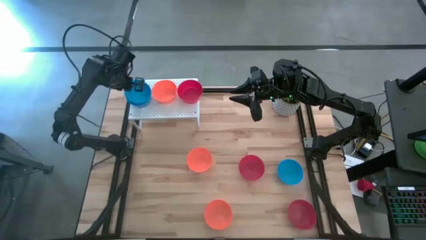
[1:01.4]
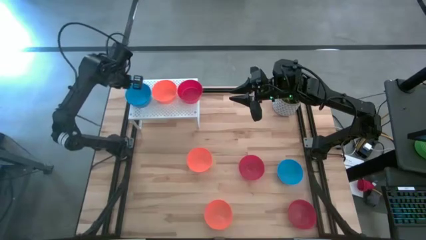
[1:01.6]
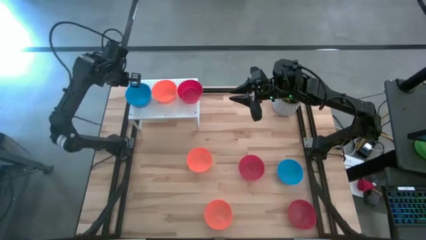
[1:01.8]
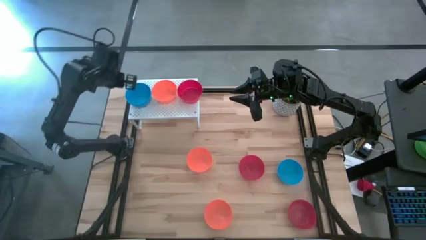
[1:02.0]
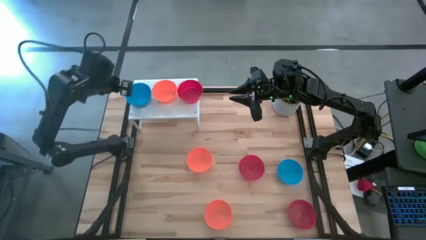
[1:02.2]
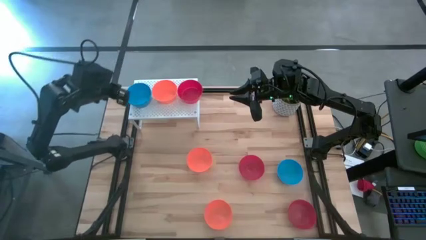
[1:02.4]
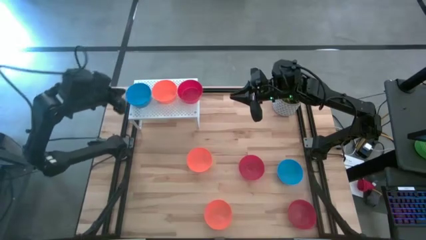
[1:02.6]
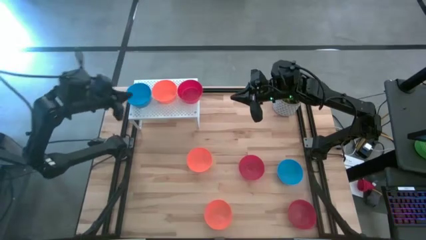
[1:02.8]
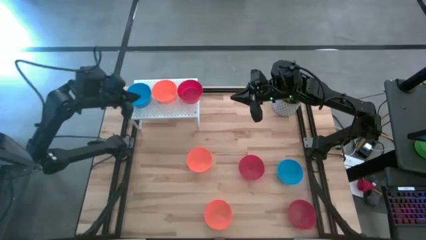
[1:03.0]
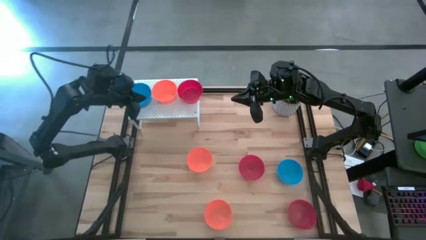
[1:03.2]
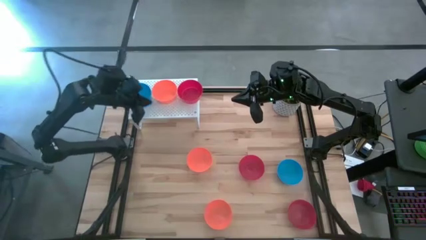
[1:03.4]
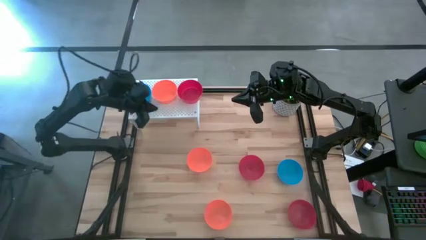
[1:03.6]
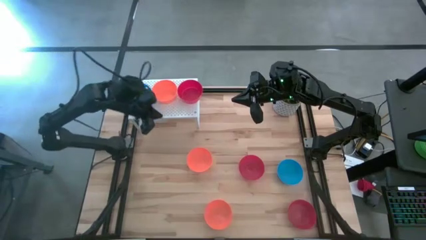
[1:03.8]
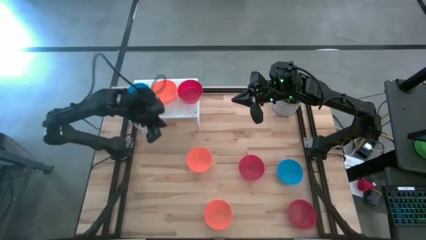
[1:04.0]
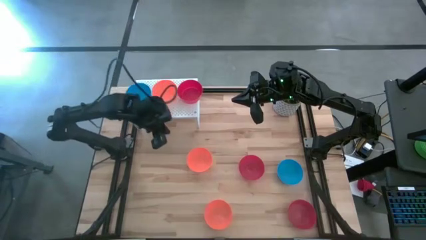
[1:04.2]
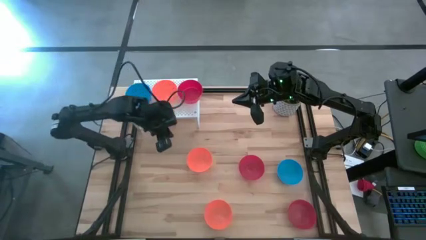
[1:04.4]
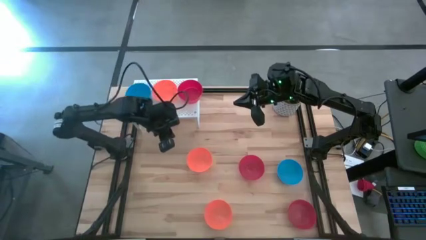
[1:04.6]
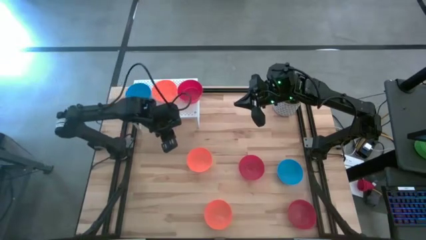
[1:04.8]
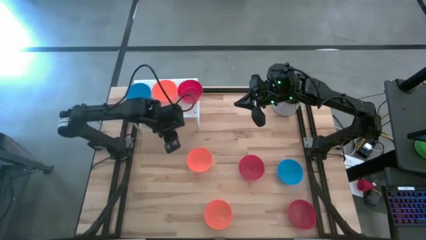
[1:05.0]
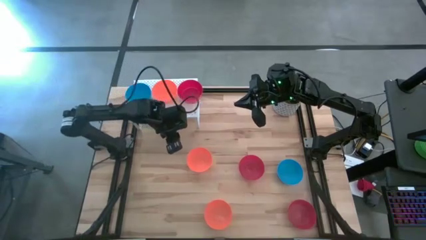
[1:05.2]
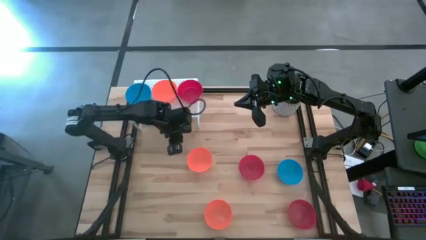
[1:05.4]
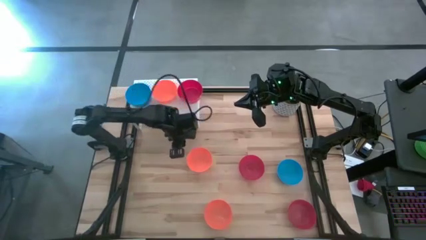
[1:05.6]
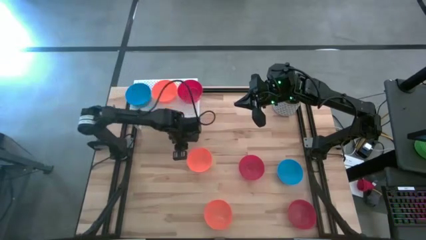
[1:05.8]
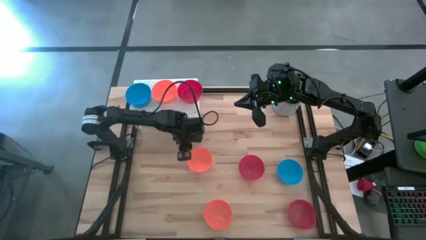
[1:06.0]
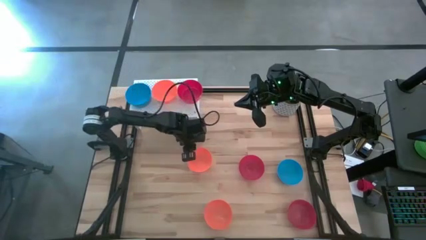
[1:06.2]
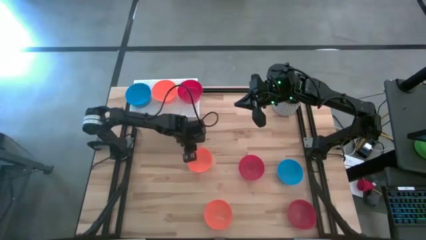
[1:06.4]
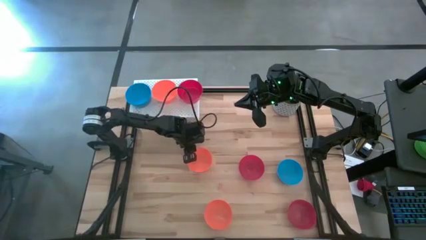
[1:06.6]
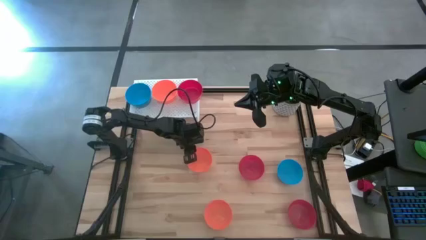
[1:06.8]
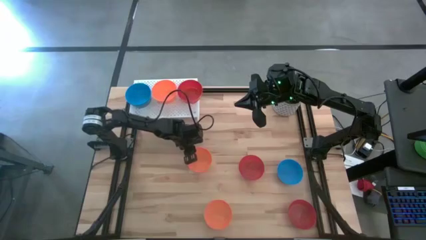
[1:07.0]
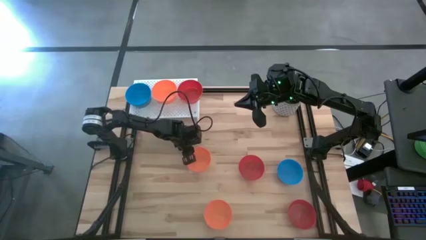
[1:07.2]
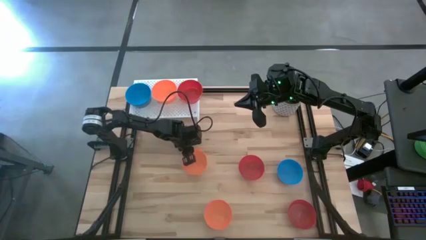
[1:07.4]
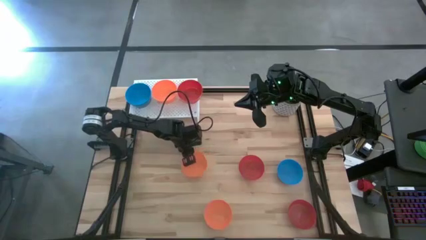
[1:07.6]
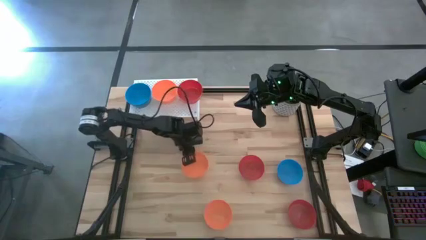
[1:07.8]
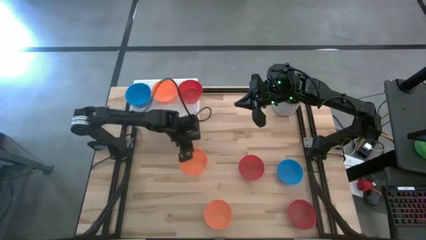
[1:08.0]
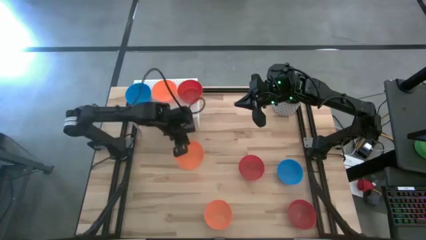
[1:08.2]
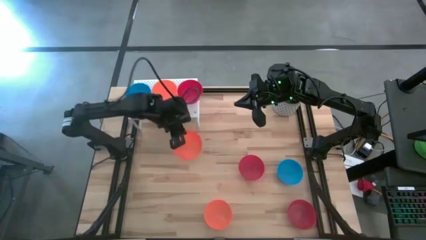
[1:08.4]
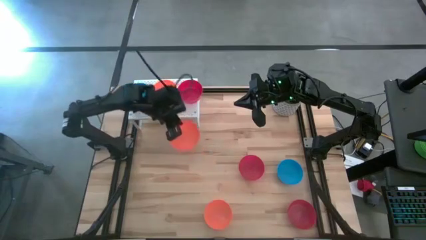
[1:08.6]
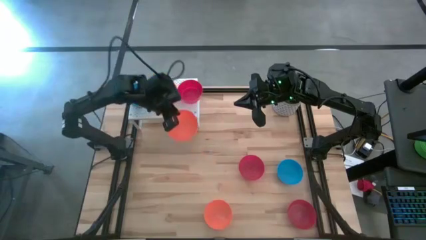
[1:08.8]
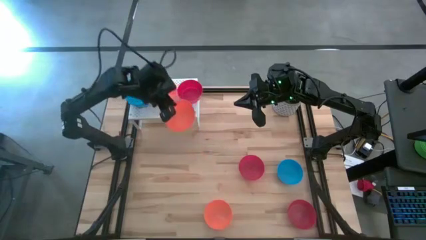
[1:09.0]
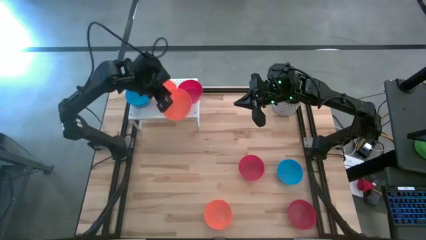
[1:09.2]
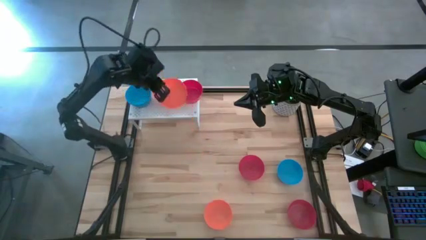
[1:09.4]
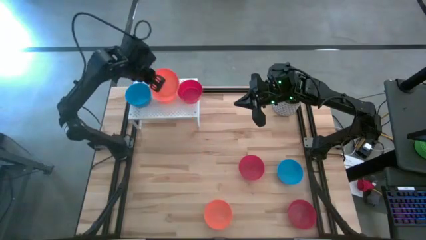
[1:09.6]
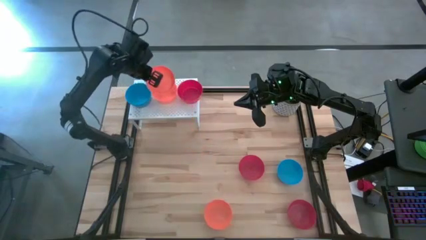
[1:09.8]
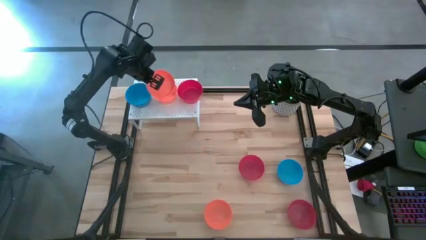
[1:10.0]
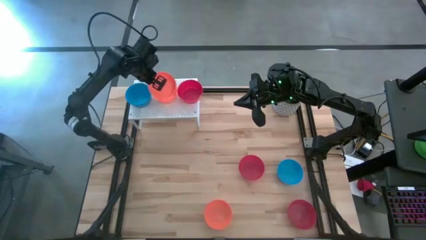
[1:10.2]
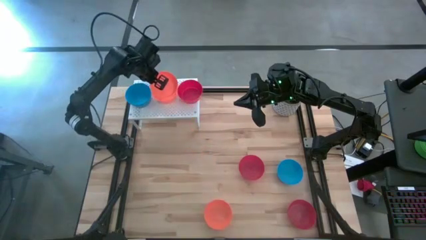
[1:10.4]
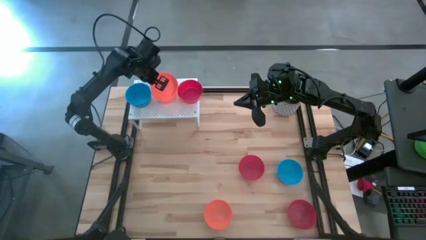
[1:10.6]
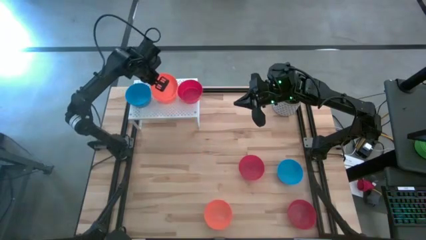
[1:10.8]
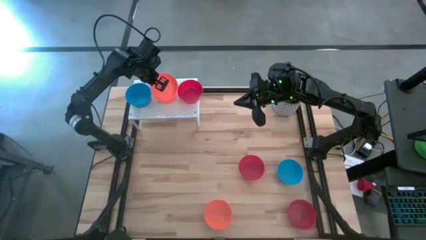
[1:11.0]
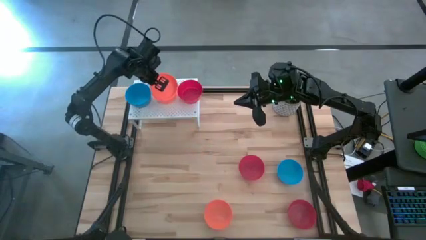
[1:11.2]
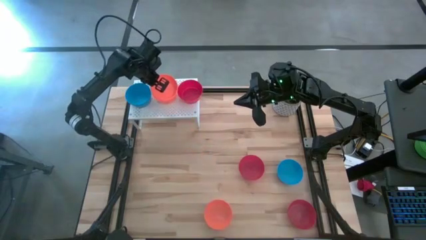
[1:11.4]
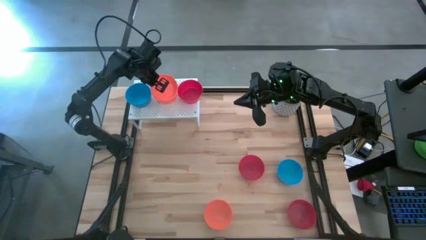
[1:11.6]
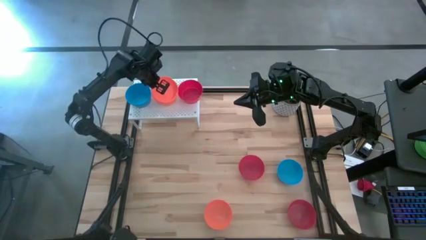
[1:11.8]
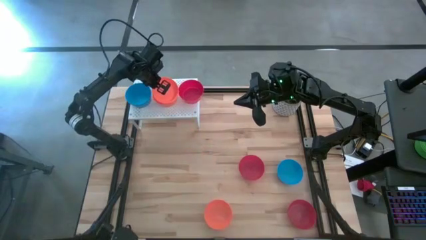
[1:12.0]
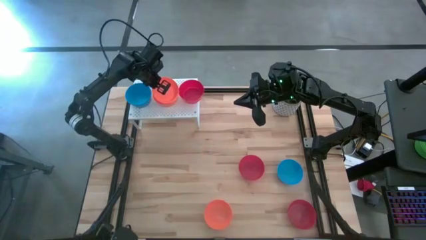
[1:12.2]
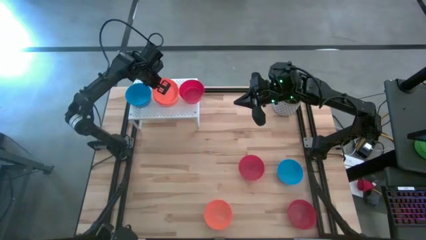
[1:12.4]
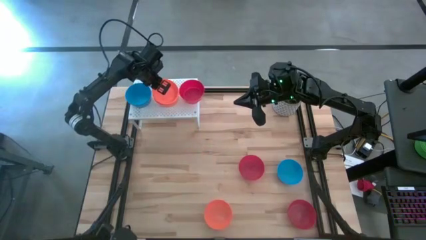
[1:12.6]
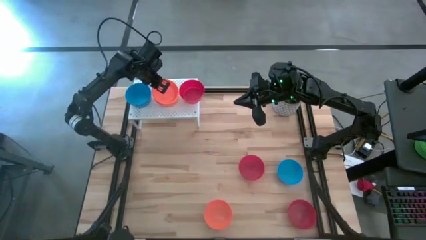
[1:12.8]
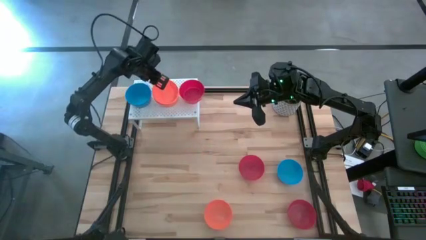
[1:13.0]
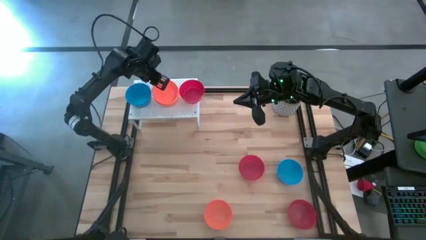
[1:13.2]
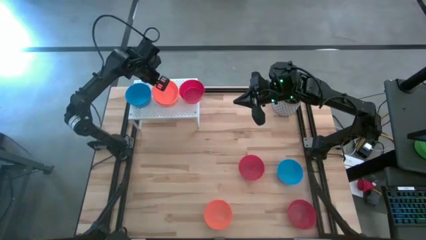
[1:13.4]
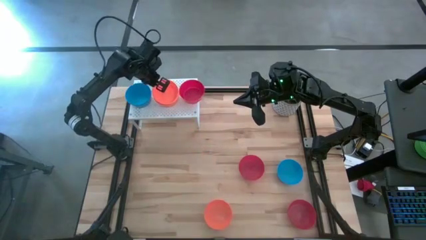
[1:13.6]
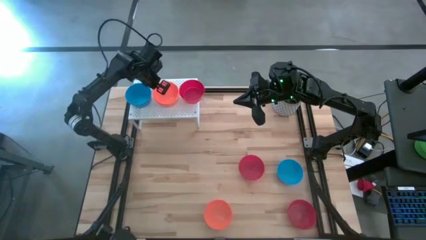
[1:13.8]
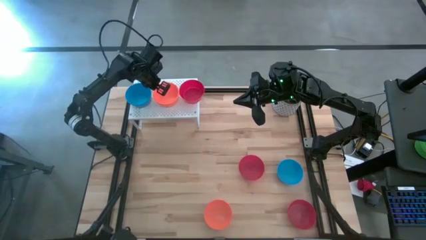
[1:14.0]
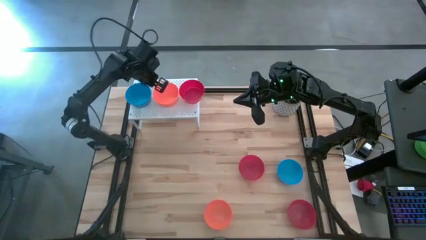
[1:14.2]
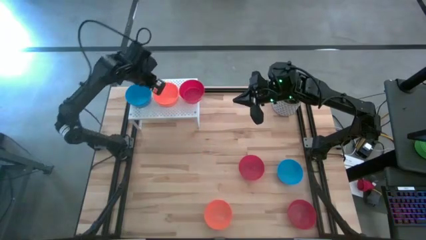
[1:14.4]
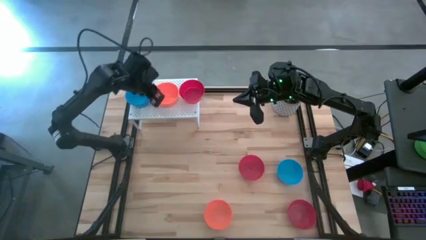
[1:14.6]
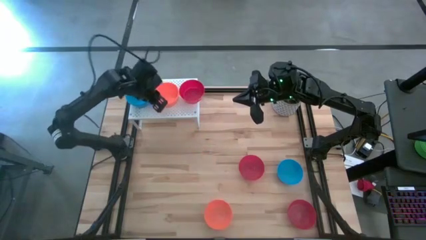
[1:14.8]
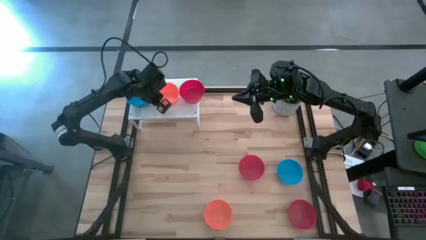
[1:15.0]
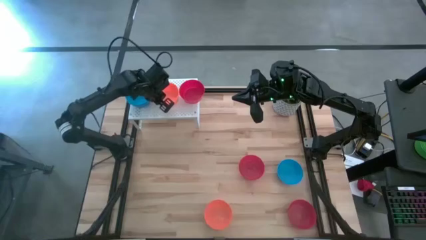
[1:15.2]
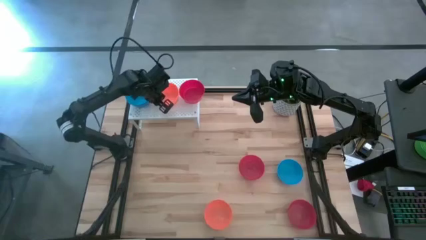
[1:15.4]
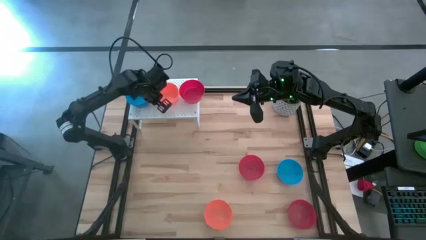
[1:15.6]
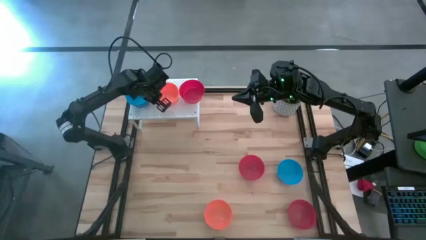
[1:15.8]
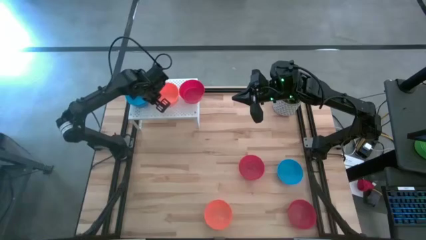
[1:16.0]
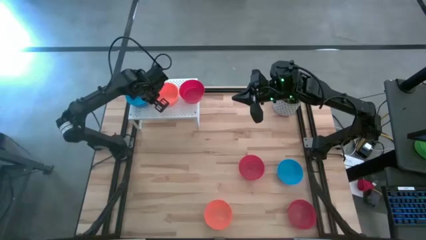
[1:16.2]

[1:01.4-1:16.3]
Task: Pick & Place Mini bowls
Stack the top orange bowl on top of the orange bowl on the shelf

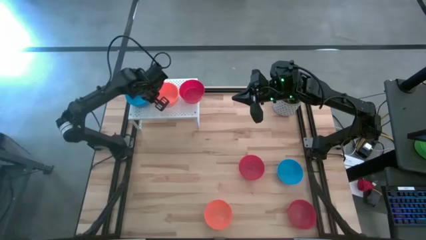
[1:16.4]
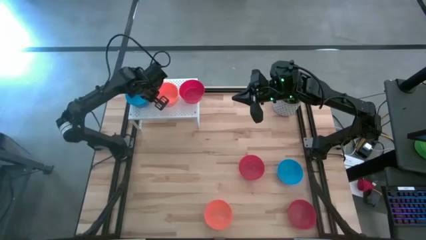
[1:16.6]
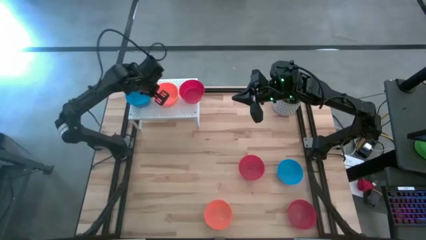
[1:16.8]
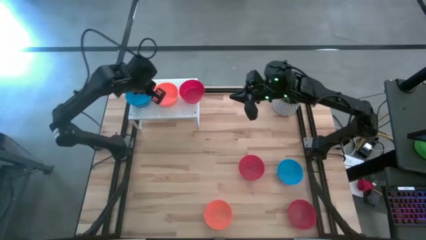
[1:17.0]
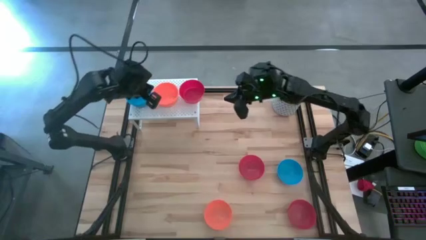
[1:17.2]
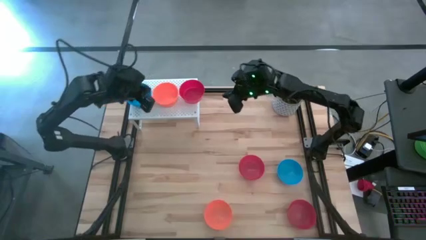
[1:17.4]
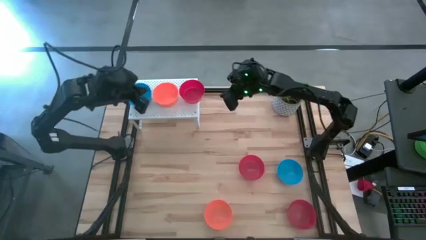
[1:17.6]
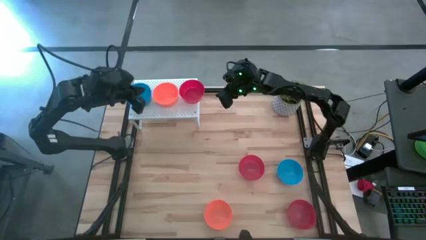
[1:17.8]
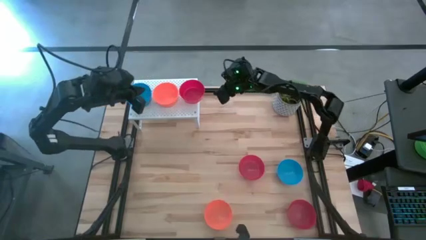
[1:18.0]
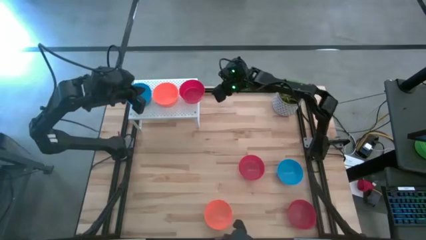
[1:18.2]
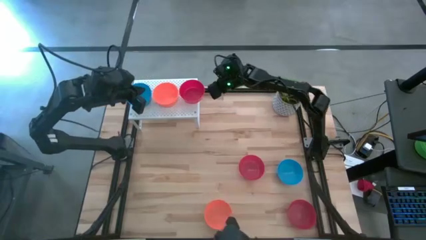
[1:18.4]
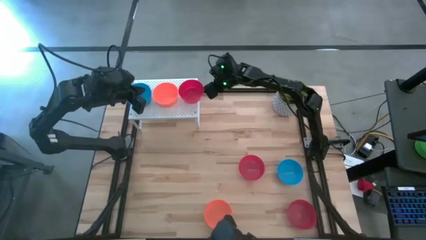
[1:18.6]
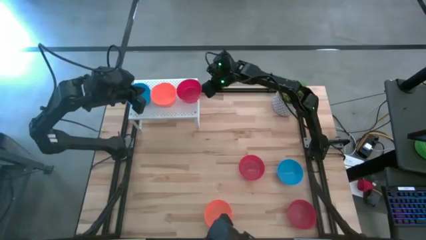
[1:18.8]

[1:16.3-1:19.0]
Adjust the red bowl on the shelf
